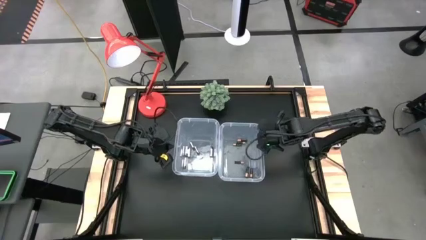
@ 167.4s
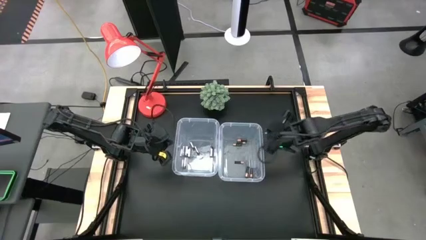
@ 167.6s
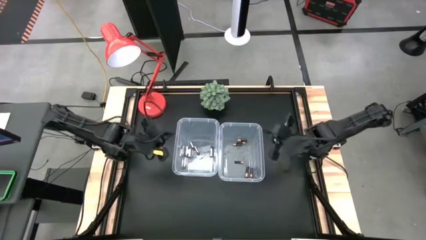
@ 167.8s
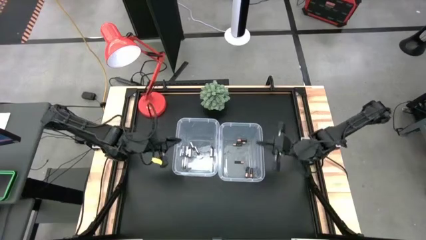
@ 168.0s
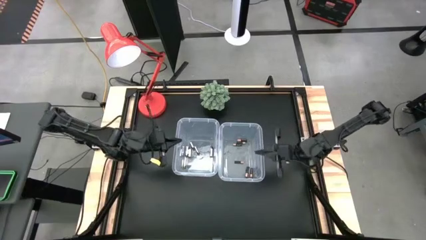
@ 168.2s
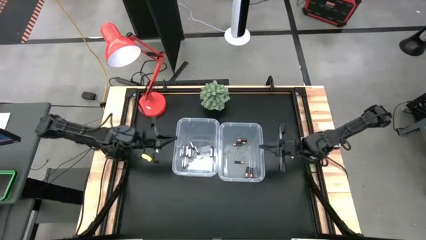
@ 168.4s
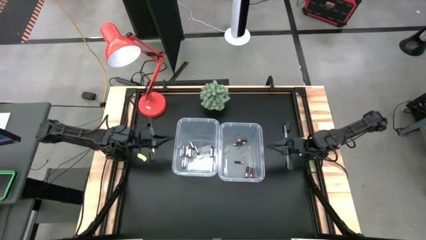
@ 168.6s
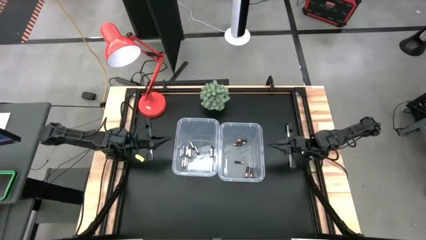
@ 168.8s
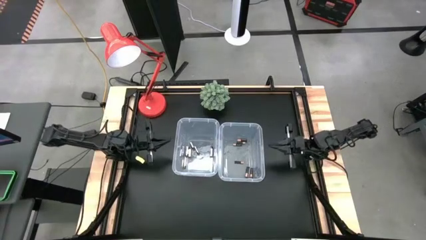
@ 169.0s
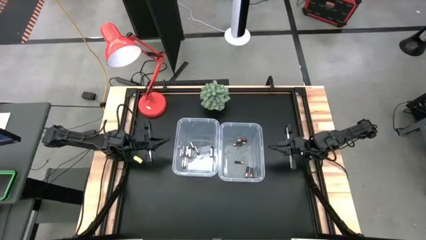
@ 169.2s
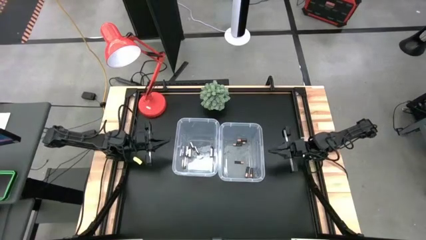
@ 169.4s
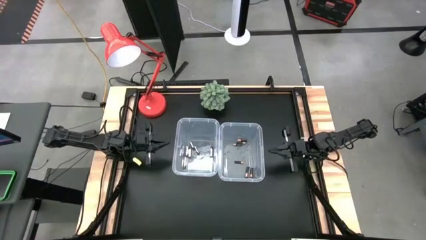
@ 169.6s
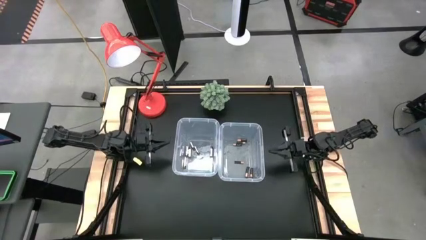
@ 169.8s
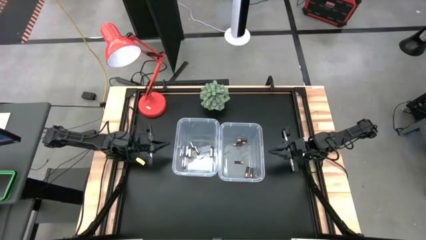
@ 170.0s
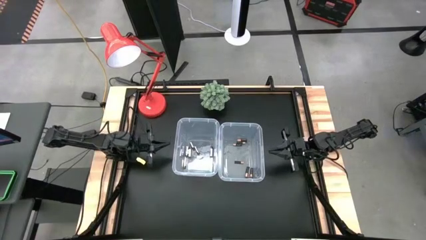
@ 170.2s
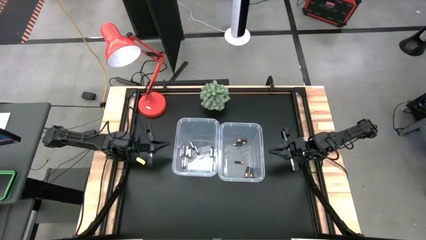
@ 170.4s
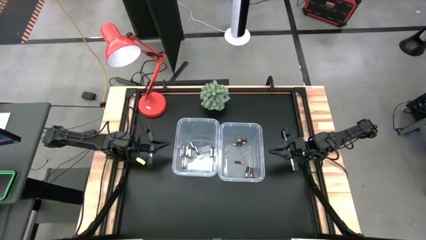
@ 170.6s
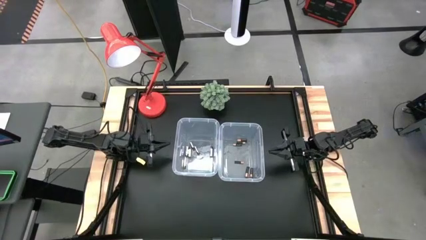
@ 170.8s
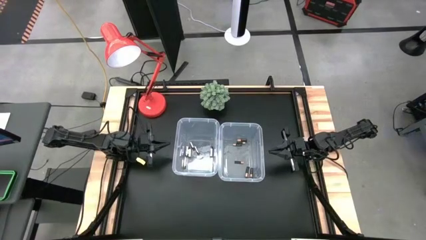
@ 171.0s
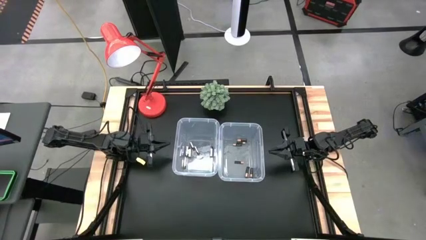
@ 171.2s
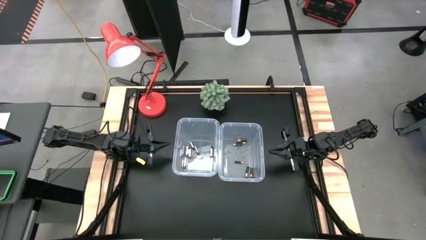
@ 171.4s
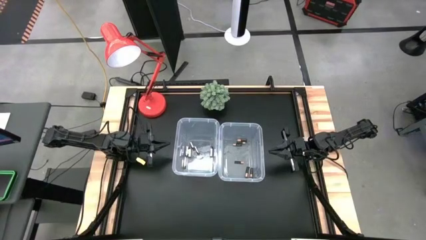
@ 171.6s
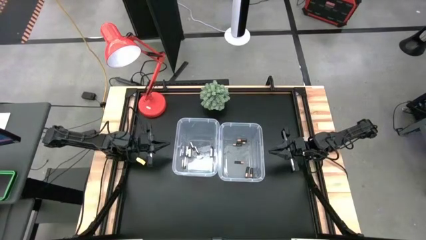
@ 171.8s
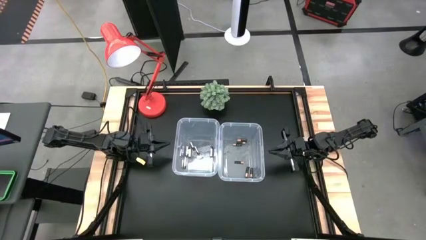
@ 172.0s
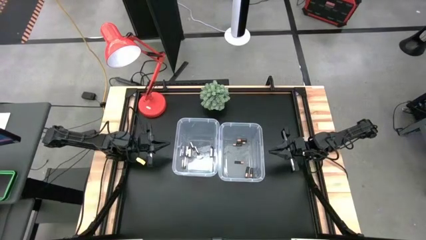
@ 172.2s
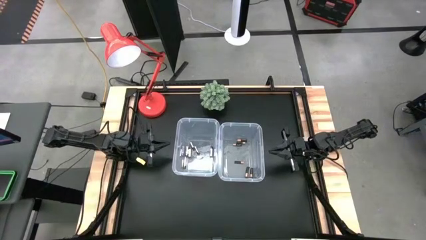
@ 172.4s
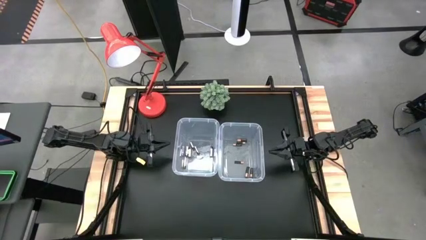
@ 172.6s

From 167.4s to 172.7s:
Task: Sort batteries
Return to Home Position

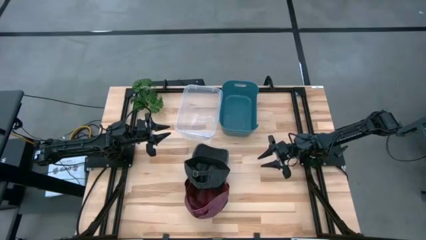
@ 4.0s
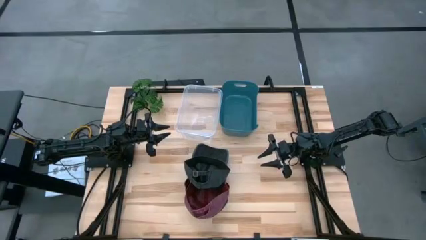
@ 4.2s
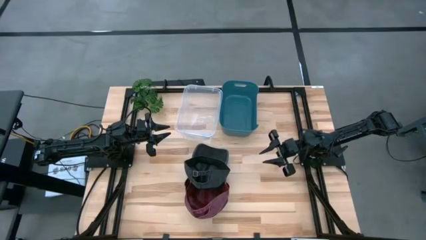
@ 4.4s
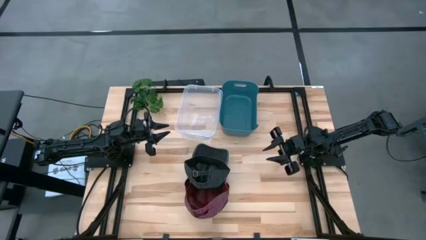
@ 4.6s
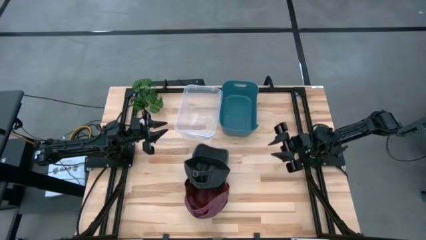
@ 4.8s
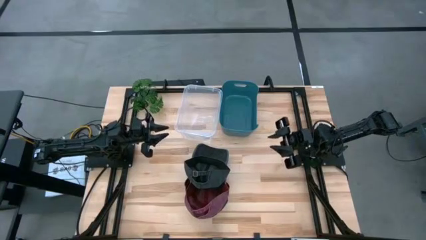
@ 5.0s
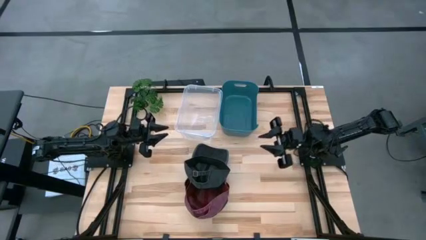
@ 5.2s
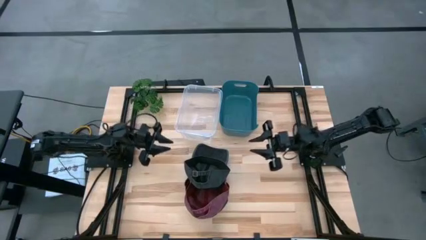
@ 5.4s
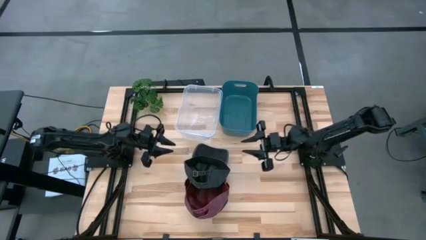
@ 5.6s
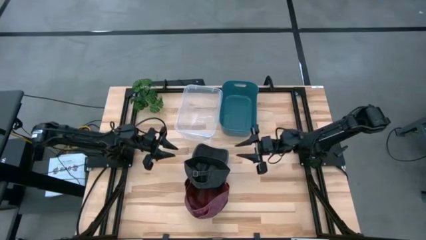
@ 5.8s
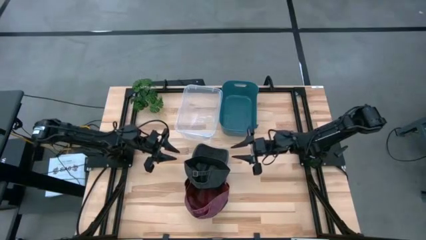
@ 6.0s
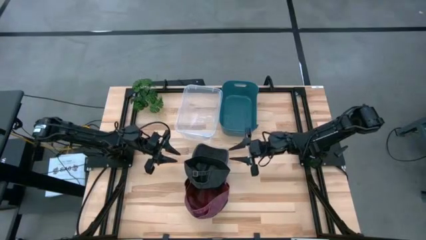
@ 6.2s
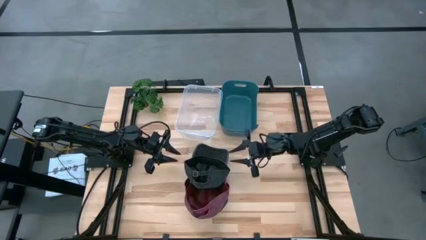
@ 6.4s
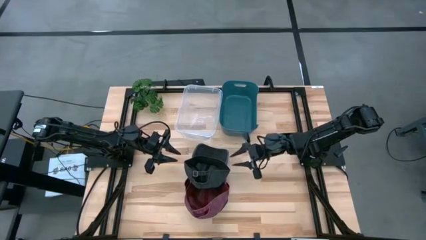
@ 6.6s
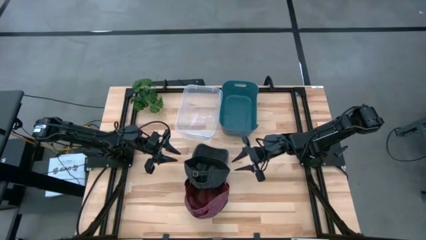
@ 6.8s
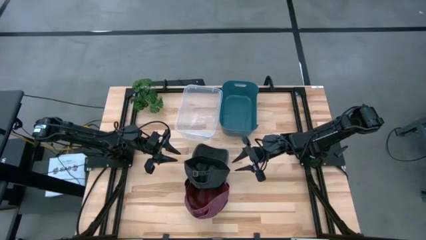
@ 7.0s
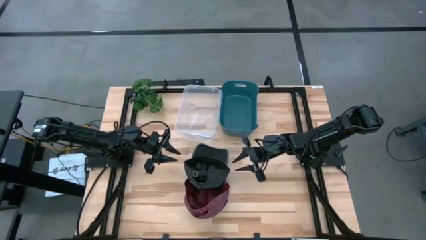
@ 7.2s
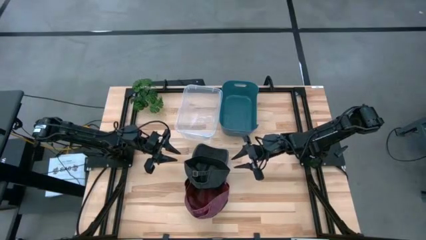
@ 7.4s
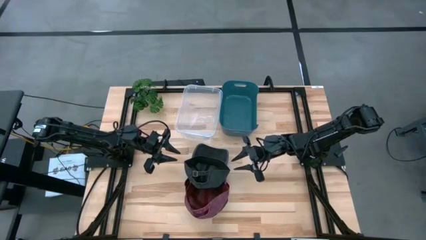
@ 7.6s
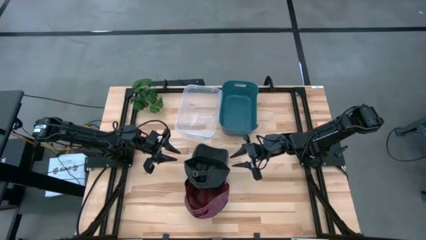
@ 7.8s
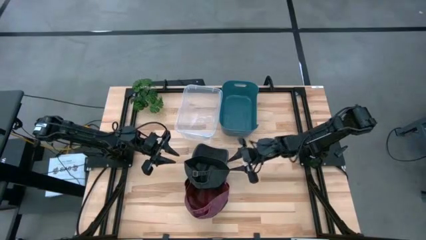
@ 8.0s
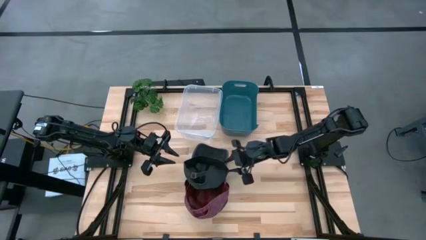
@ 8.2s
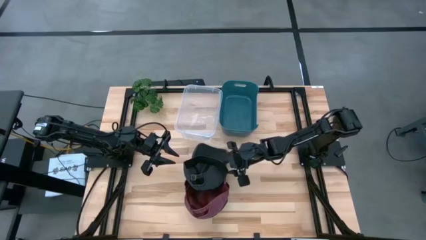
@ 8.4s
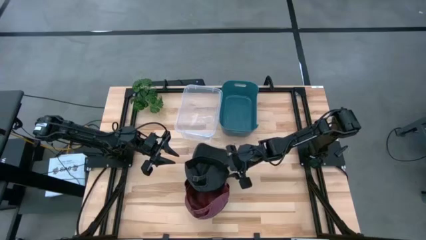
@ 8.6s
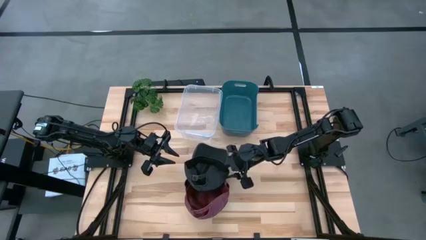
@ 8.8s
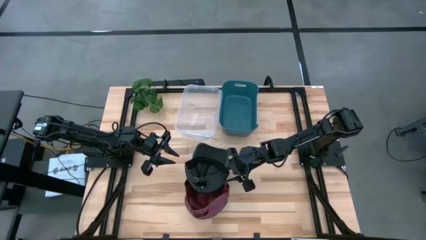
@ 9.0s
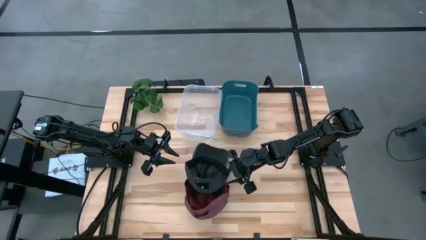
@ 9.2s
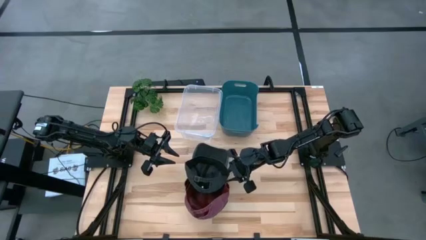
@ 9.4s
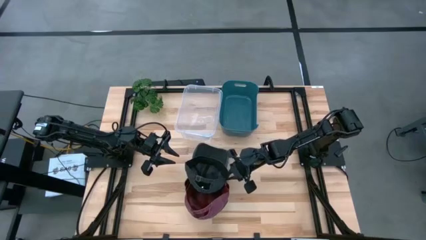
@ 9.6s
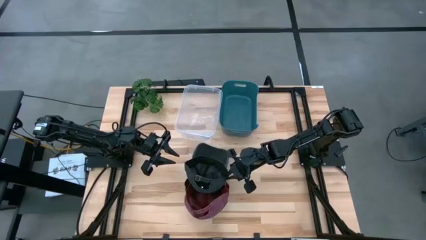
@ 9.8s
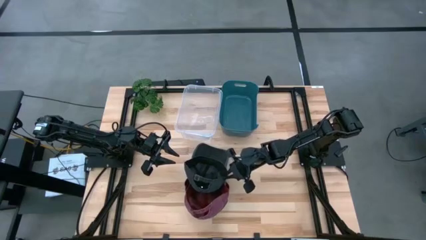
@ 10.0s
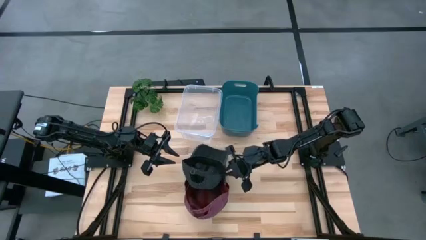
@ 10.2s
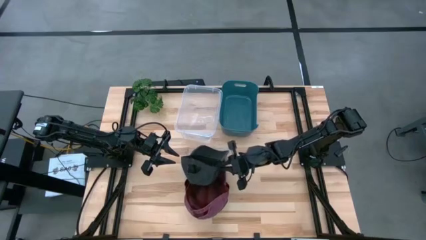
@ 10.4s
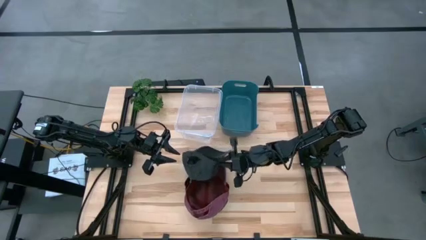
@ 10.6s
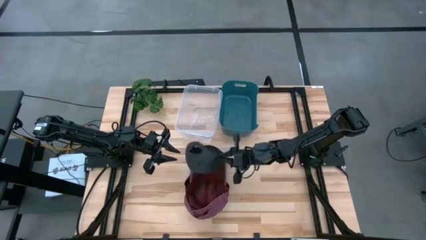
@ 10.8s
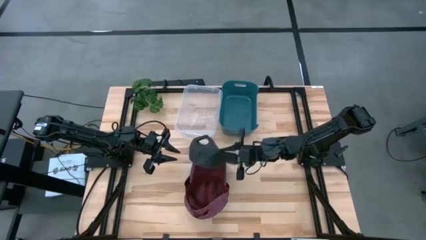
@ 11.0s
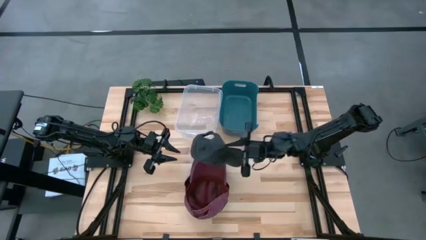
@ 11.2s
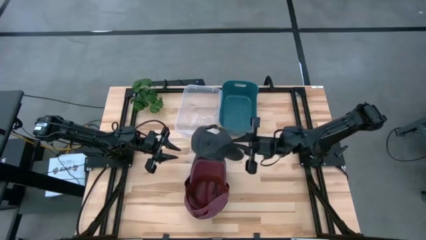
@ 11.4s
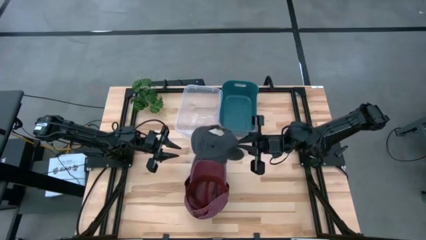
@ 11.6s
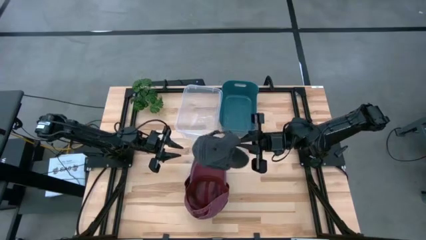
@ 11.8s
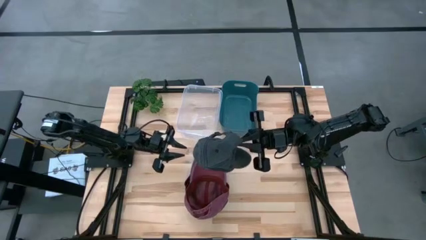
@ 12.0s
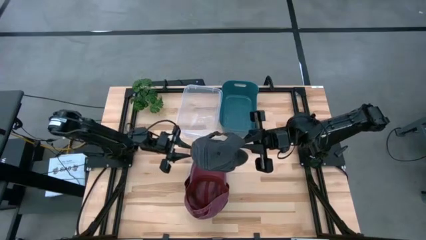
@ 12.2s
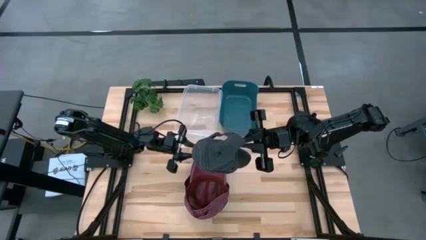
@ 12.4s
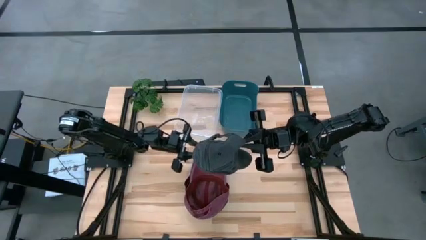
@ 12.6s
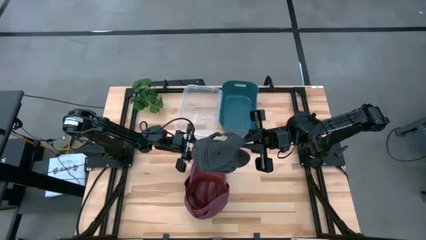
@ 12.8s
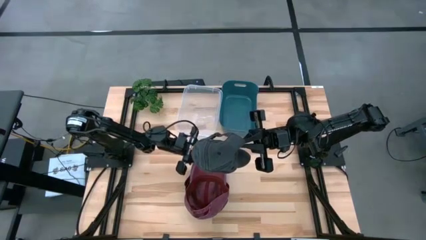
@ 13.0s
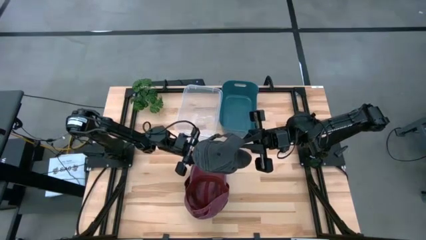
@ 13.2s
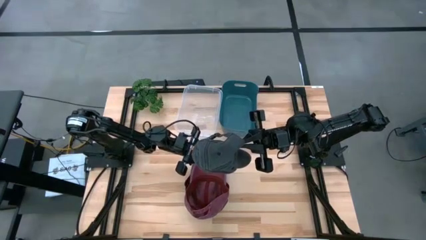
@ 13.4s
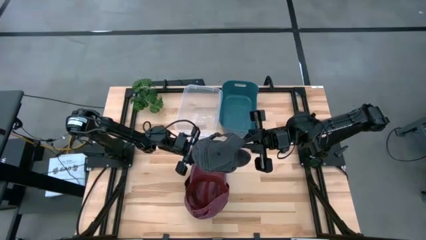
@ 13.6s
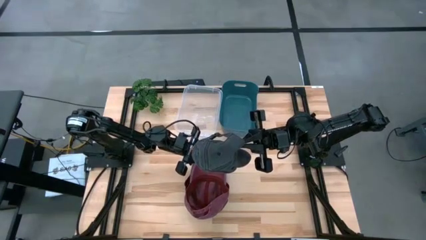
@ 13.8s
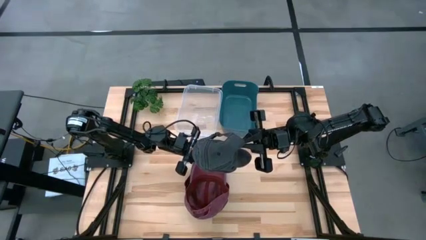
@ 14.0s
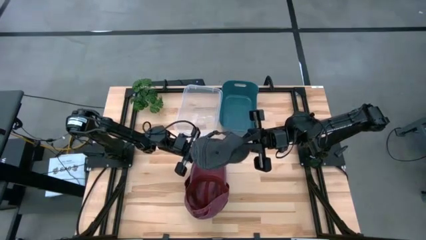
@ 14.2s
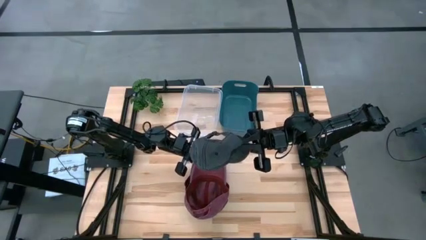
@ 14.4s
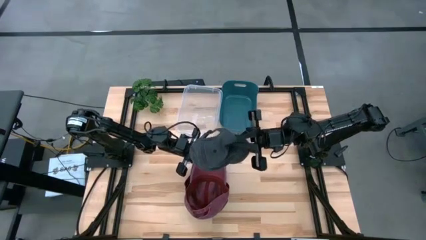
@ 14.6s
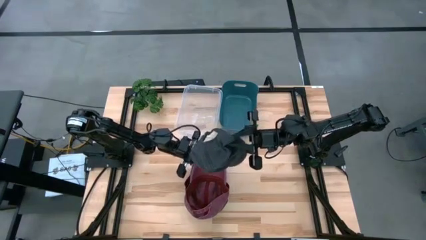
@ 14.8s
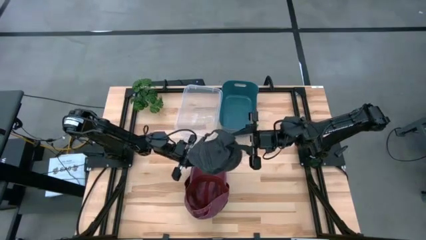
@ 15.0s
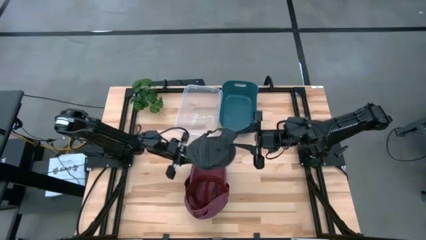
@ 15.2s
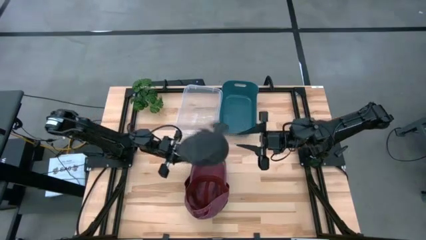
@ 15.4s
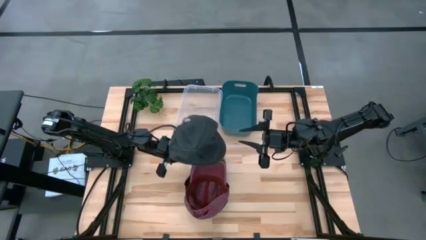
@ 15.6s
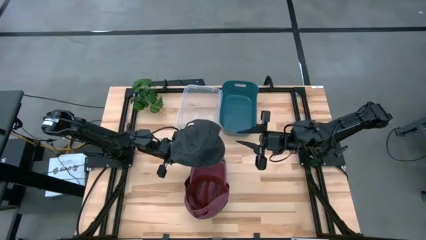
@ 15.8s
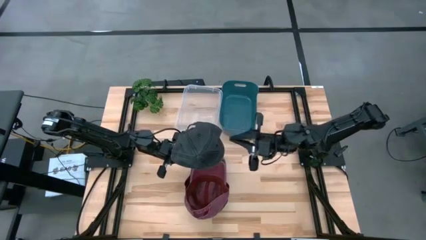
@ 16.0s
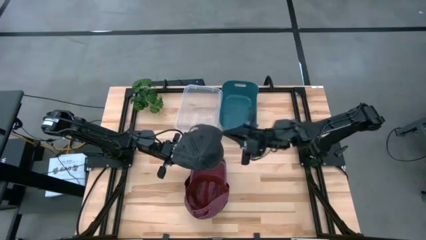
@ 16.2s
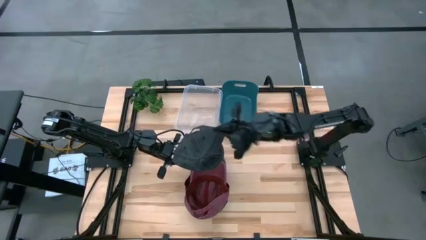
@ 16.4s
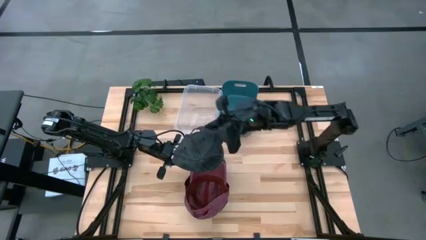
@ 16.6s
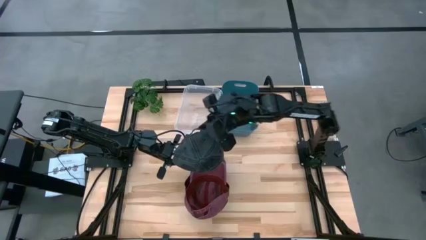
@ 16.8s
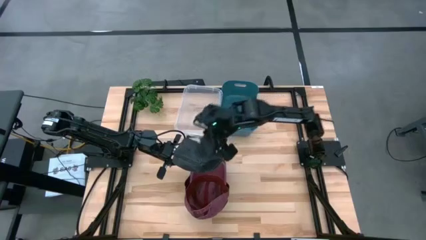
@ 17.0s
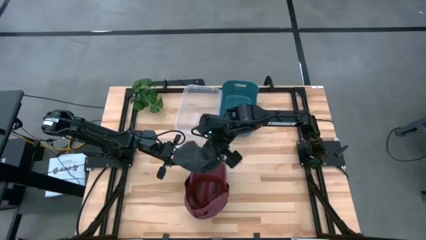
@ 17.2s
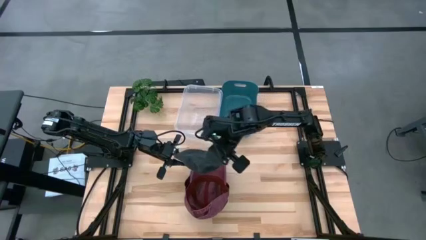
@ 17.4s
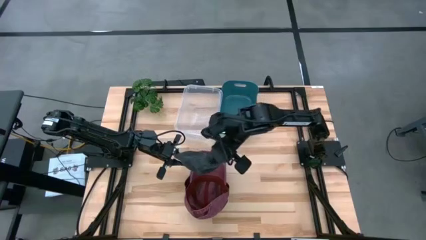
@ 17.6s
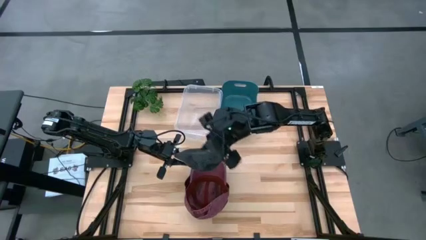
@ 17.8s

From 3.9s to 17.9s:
Task: Pick & Place hat
Put the top black cap into the blue bin
